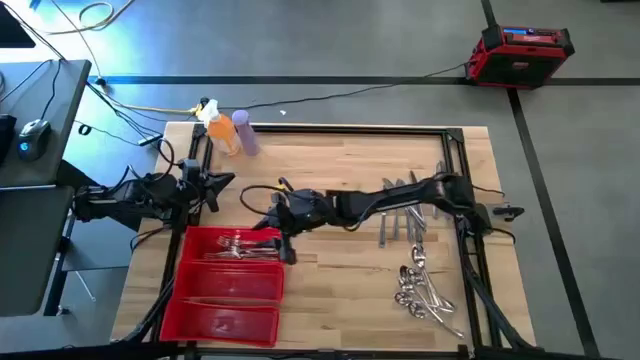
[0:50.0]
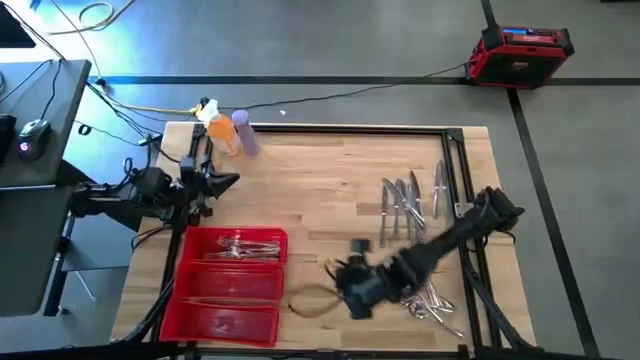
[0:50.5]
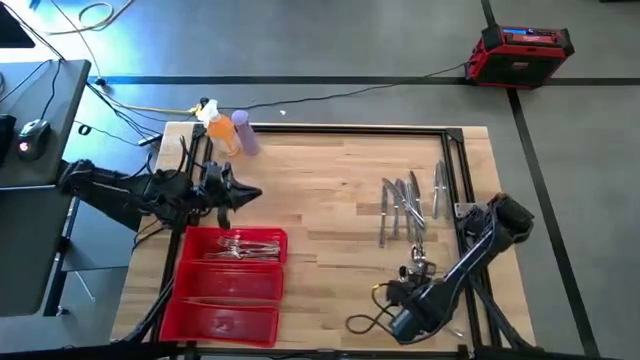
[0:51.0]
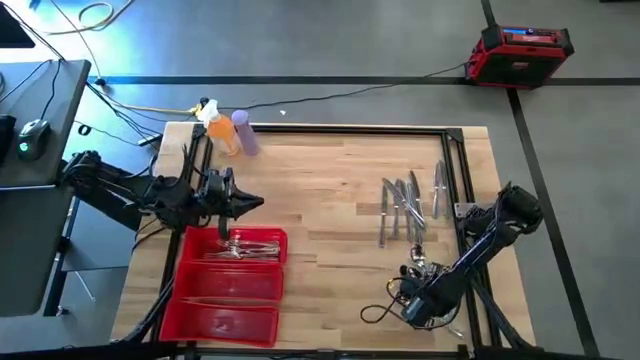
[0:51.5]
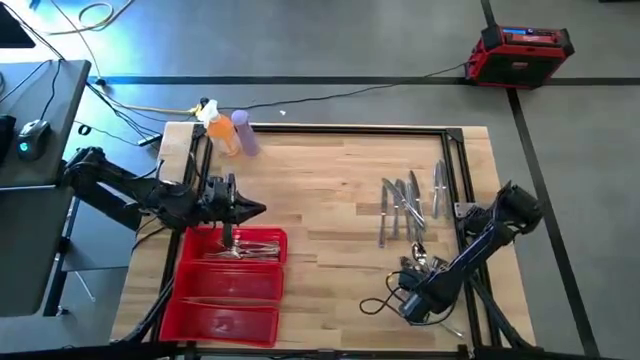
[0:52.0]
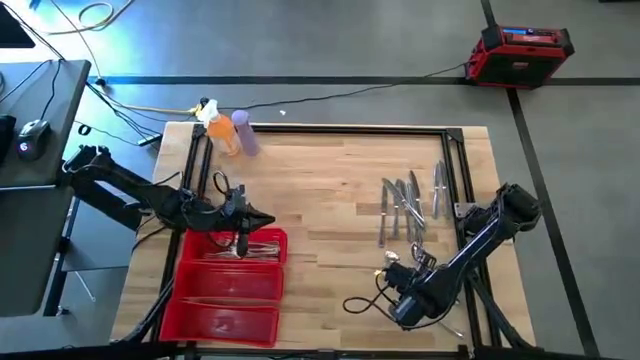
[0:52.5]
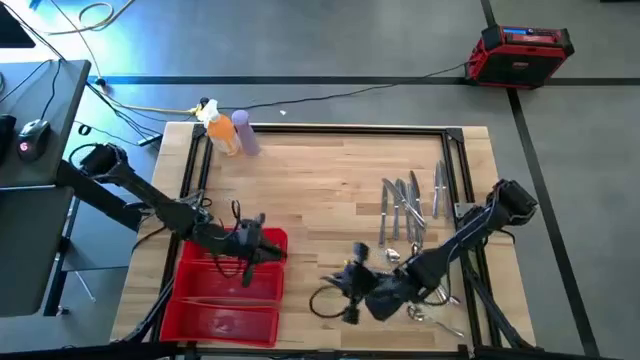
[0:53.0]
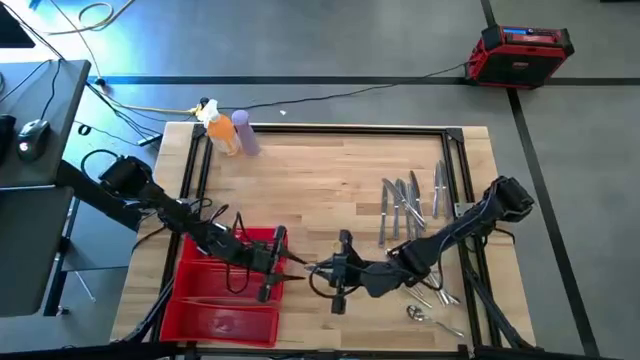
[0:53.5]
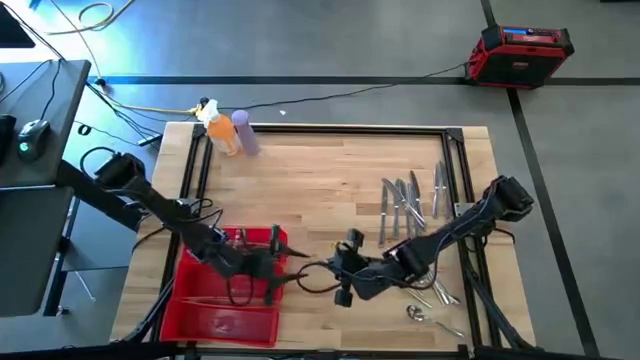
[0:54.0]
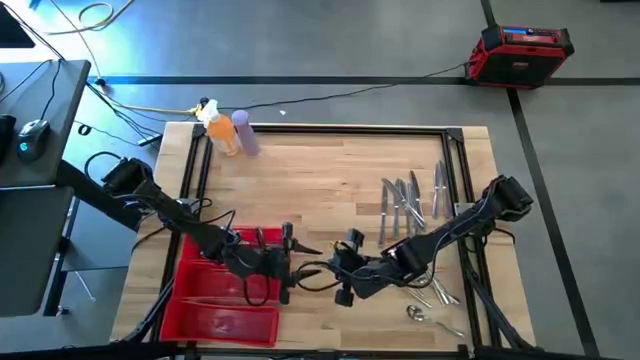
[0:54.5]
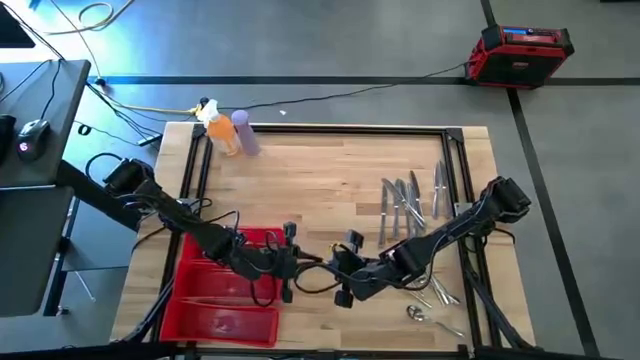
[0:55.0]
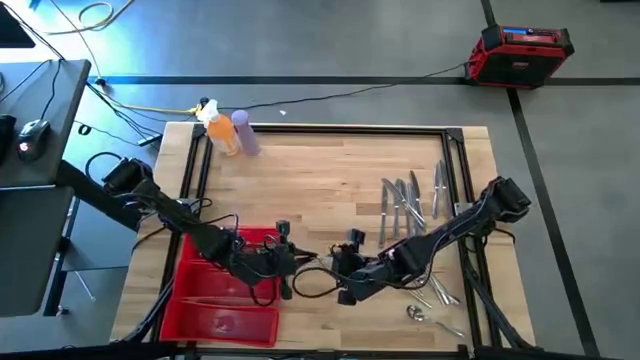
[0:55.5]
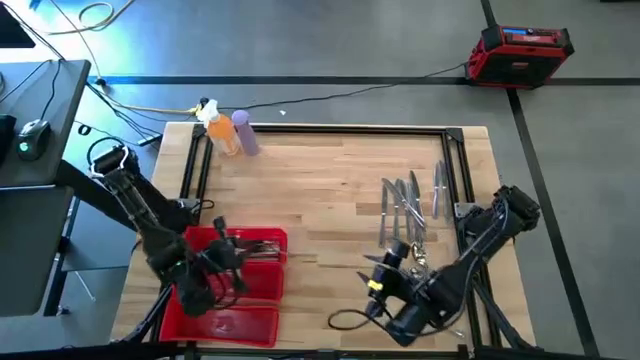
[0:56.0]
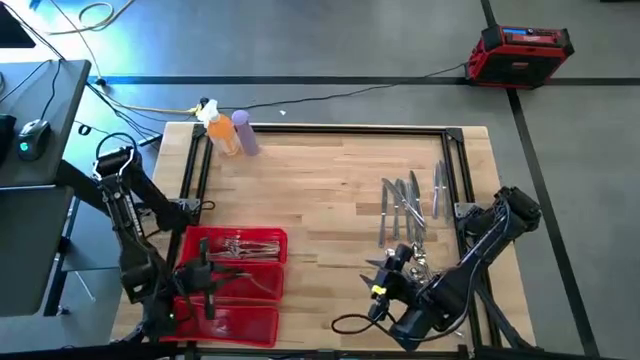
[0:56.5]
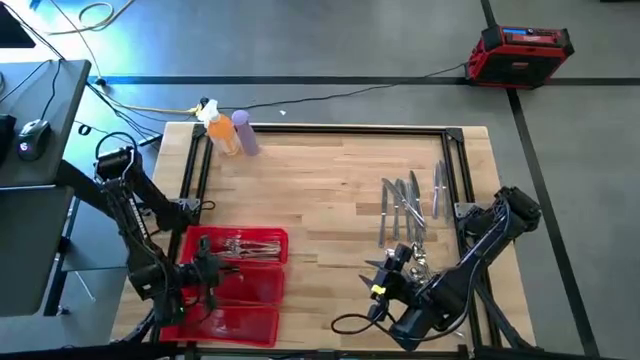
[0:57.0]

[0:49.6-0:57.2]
Task: Sort silverware
Put the silver spoon in the middle red bin

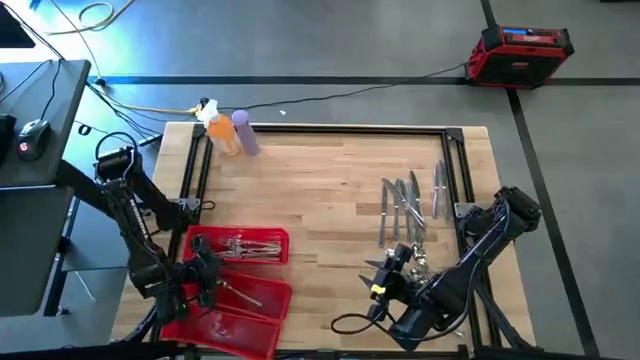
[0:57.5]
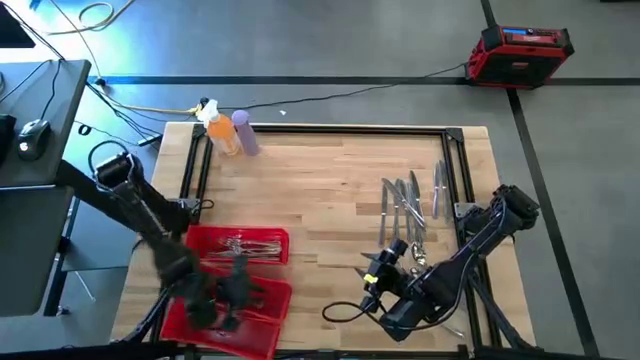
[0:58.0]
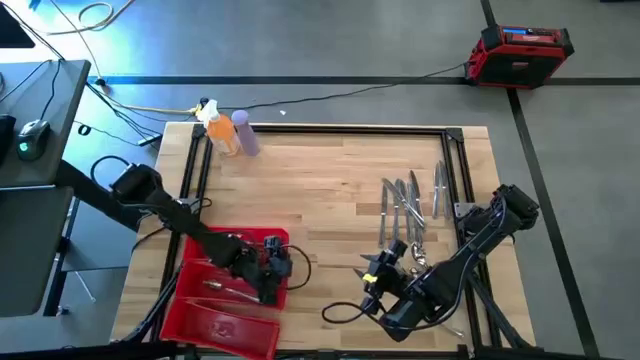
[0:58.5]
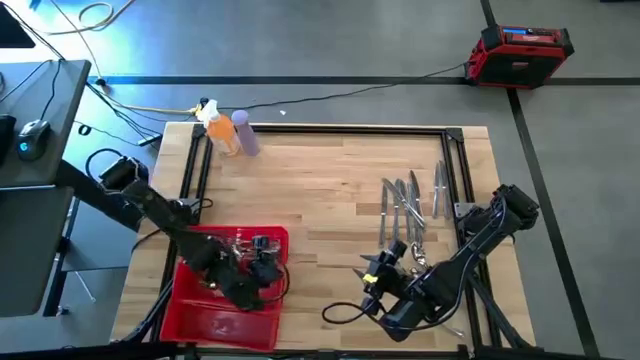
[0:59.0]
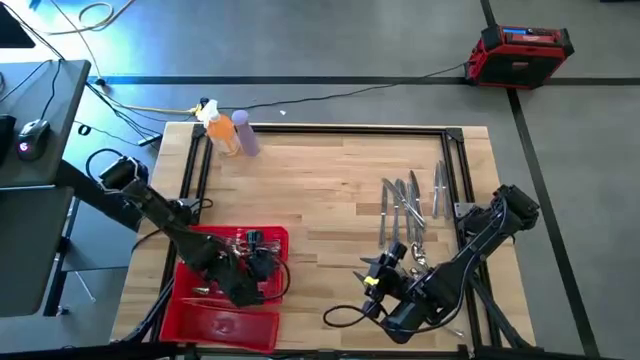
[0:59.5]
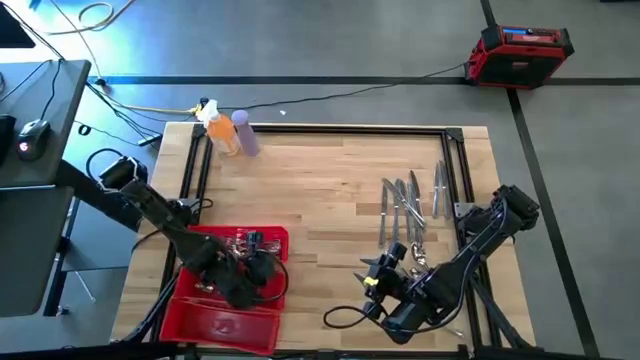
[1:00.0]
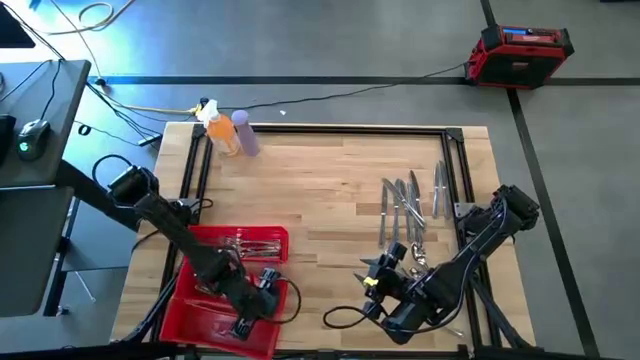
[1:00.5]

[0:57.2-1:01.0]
Adjust the middle red bin

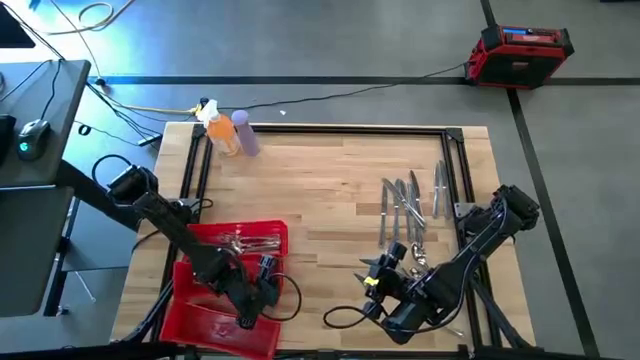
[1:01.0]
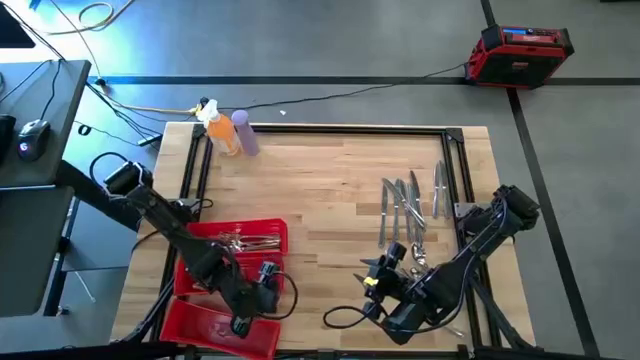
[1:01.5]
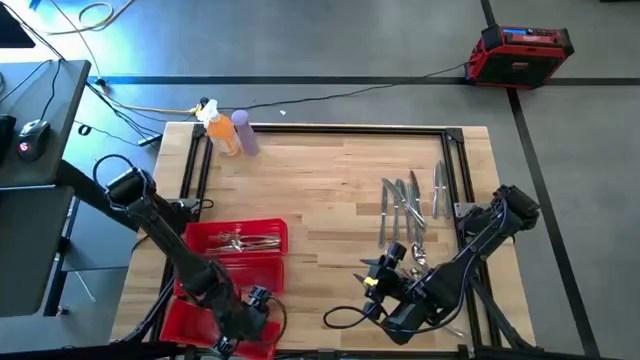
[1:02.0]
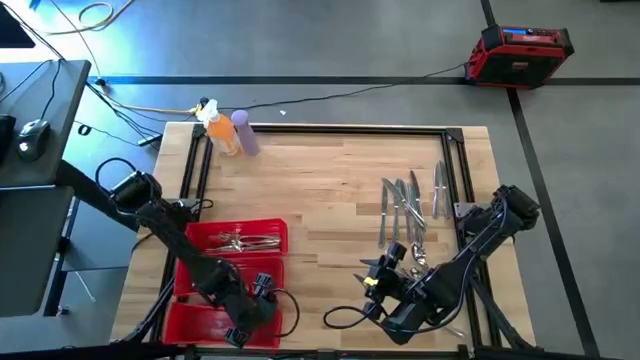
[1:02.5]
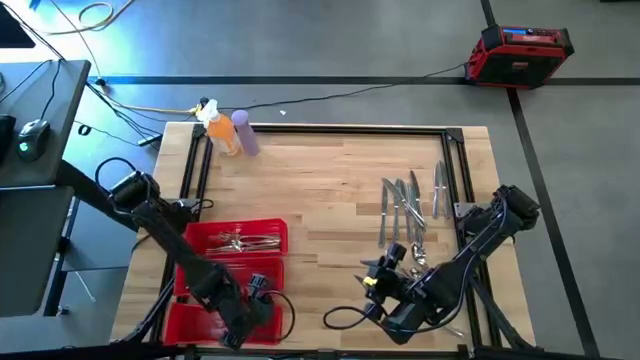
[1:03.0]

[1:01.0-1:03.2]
Adjust the bottom red bin

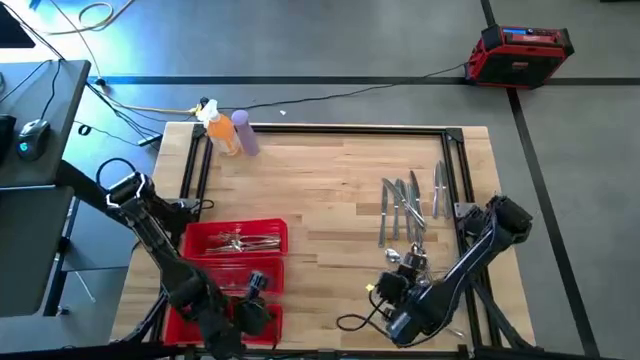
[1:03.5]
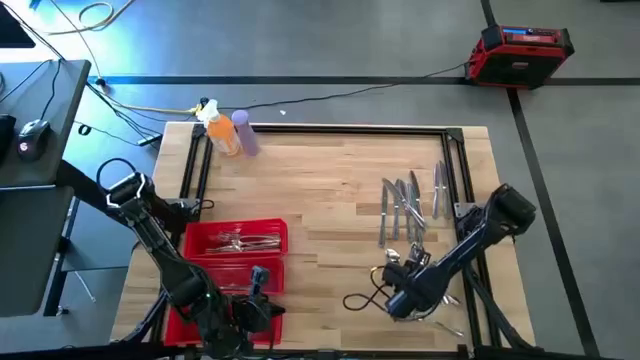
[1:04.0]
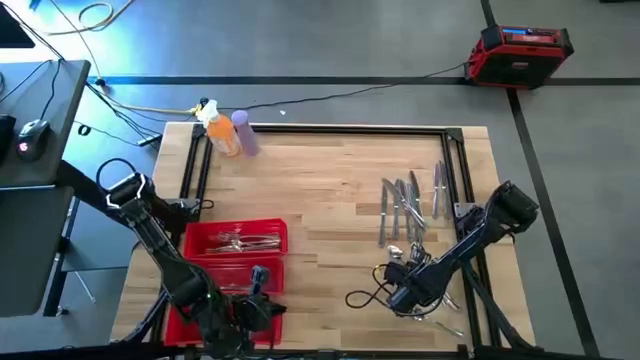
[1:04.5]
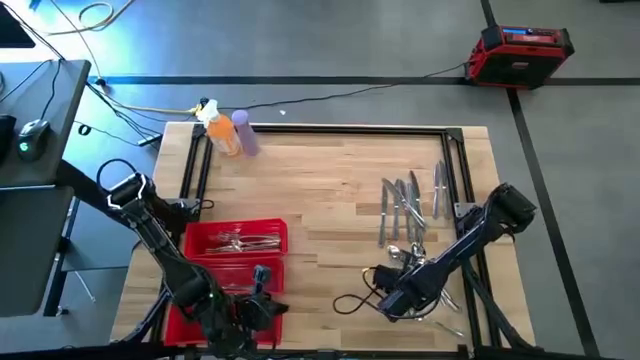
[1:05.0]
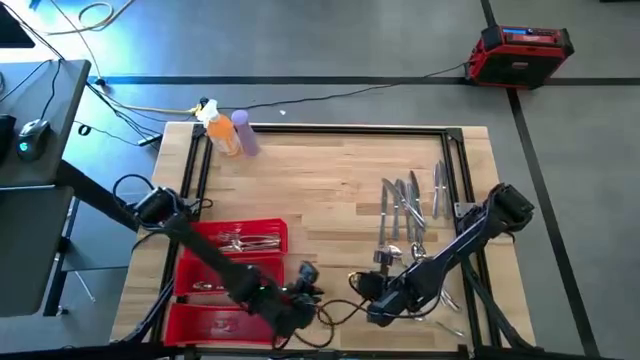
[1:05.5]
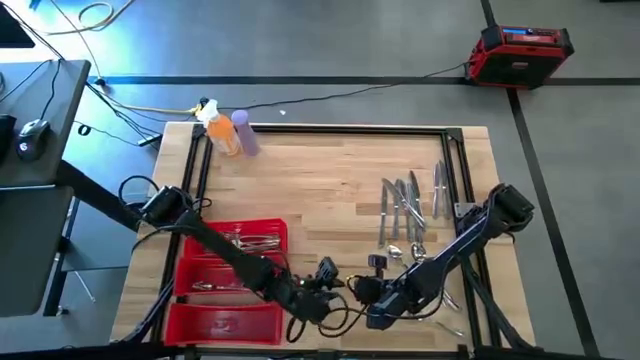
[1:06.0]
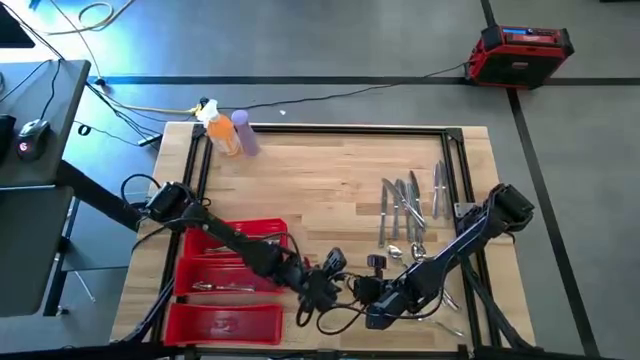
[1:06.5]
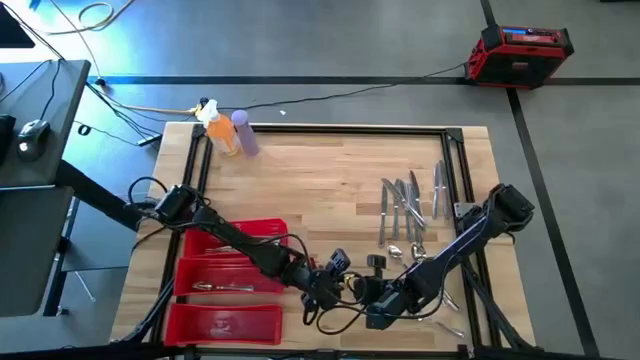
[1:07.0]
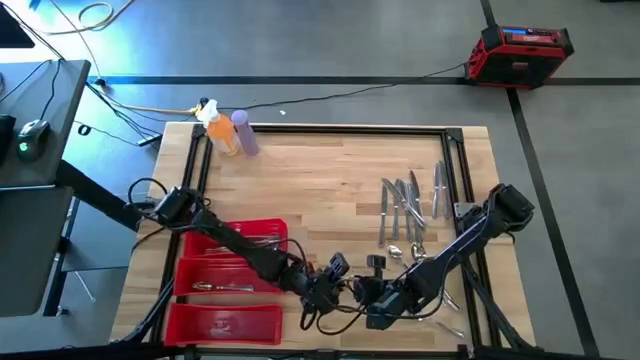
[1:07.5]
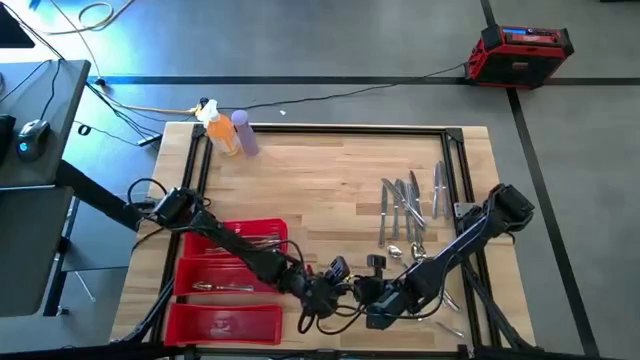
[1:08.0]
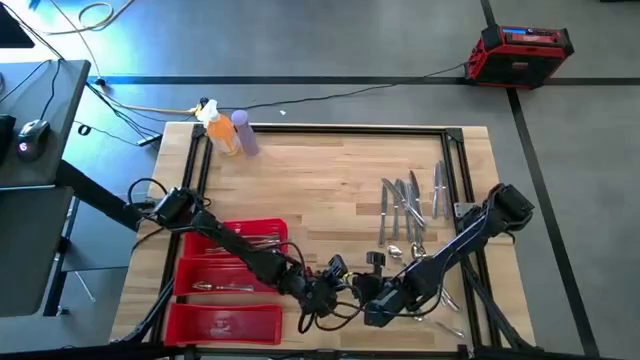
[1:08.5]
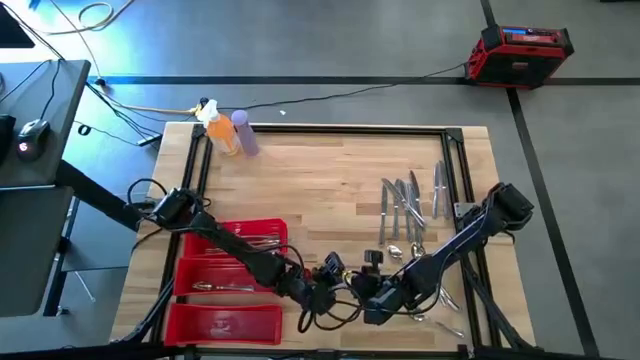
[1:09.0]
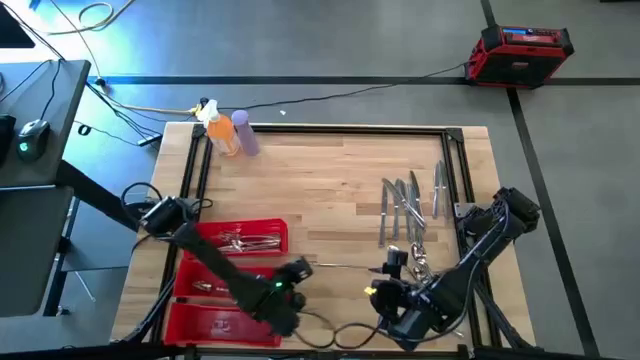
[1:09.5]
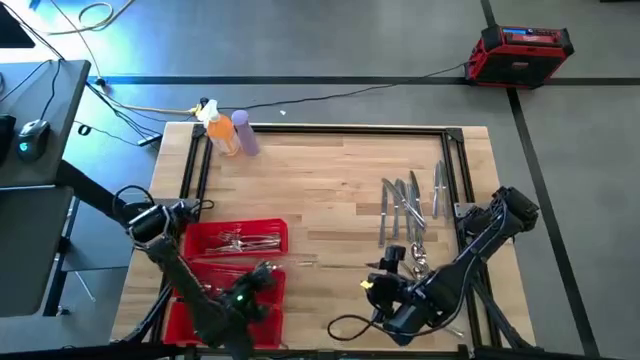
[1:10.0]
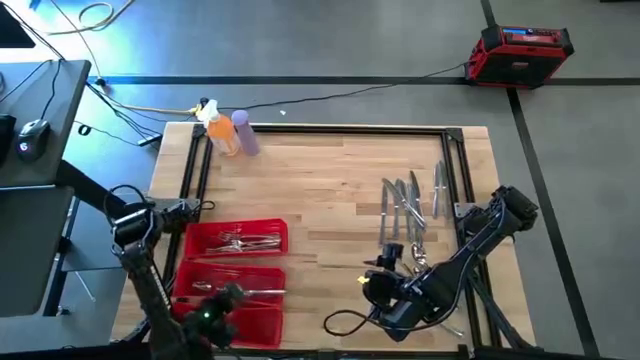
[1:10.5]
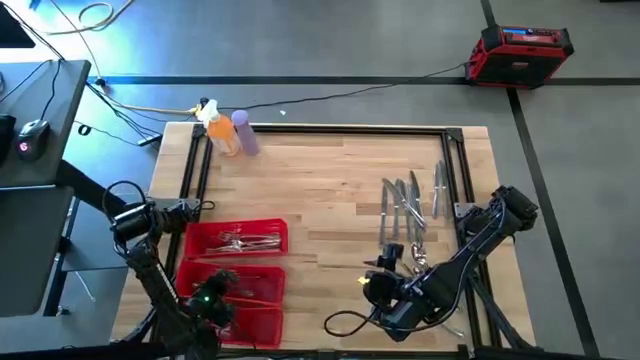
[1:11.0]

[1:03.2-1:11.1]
Put the silver spoon in the middle red bin

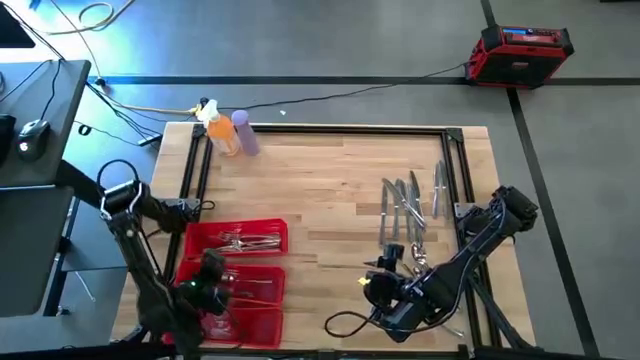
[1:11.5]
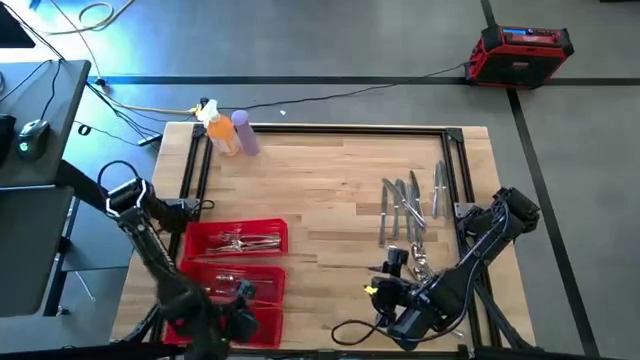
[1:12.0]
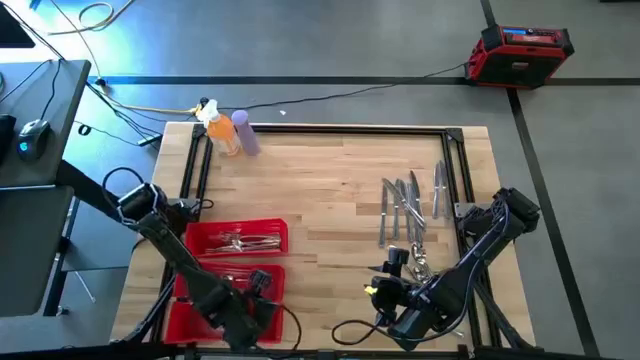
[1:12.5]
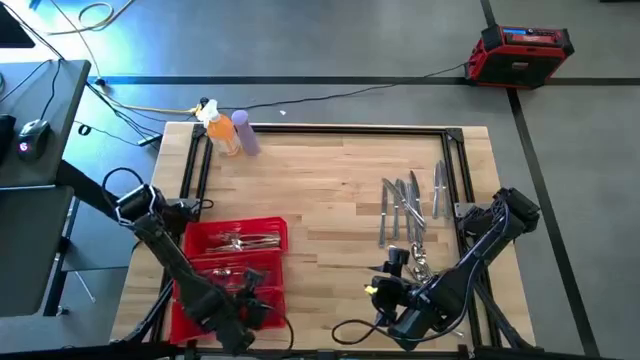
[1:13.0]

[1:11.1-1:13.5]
Adjust the bottom red bin
